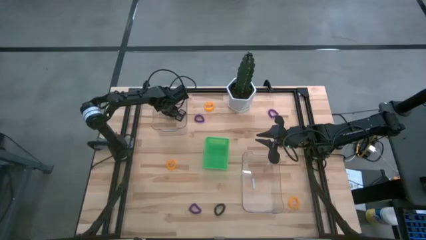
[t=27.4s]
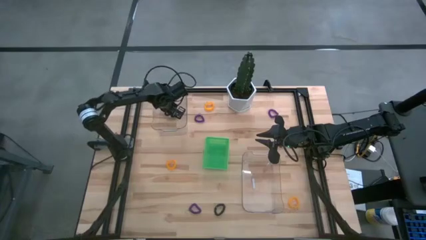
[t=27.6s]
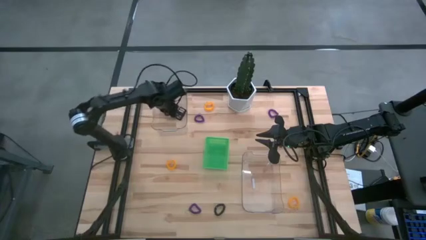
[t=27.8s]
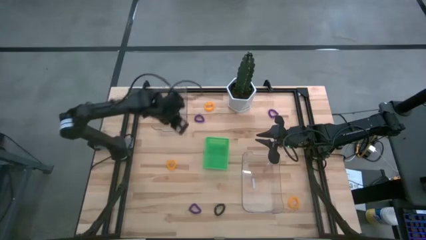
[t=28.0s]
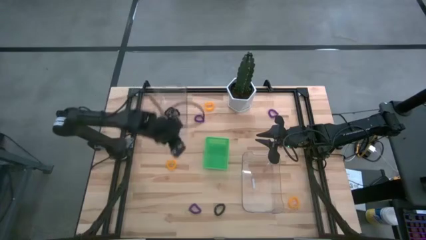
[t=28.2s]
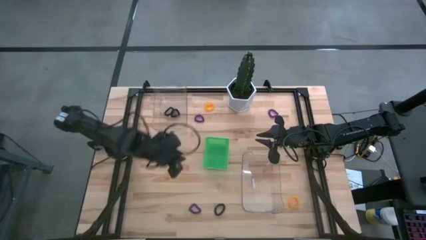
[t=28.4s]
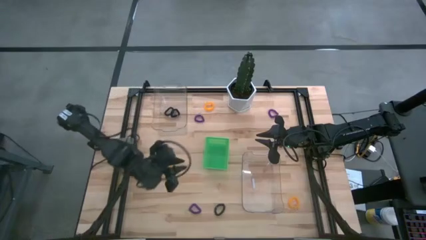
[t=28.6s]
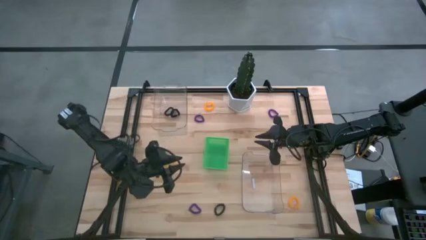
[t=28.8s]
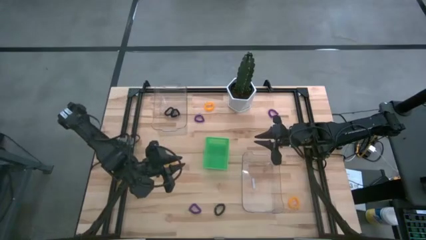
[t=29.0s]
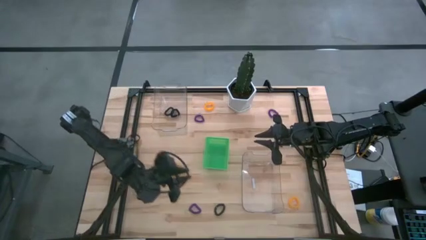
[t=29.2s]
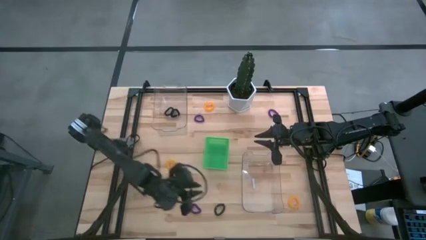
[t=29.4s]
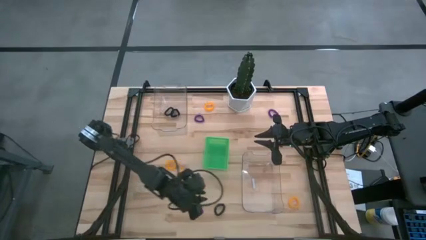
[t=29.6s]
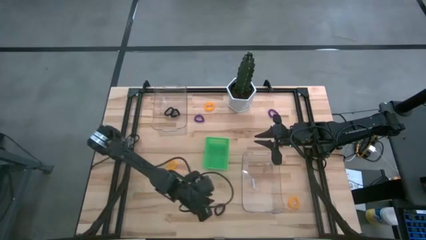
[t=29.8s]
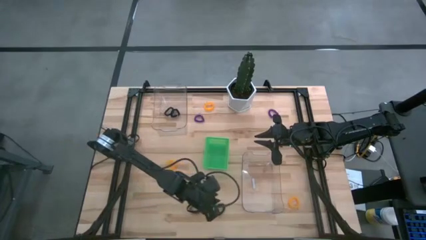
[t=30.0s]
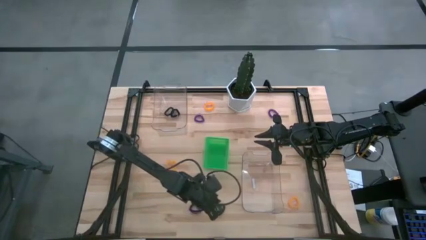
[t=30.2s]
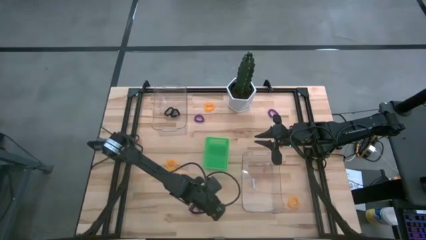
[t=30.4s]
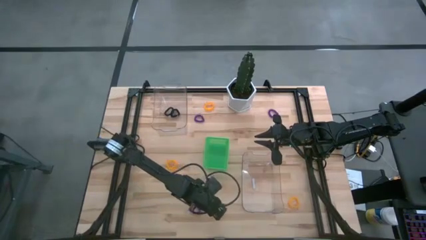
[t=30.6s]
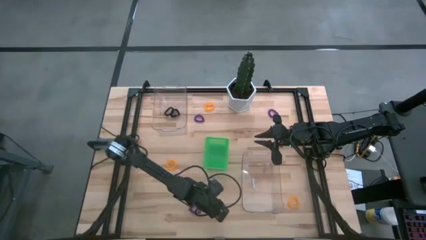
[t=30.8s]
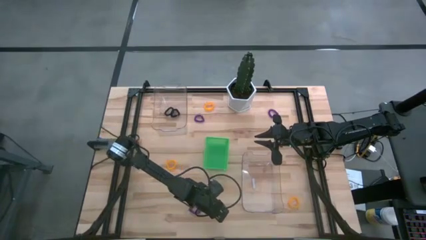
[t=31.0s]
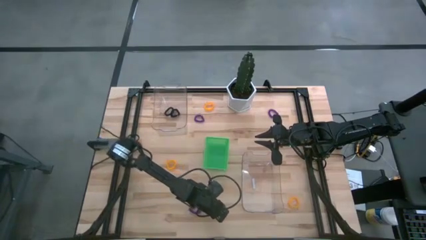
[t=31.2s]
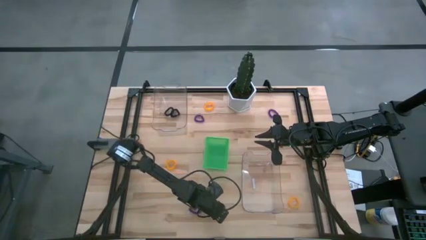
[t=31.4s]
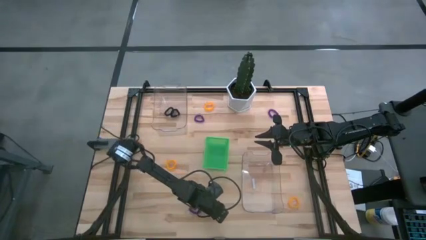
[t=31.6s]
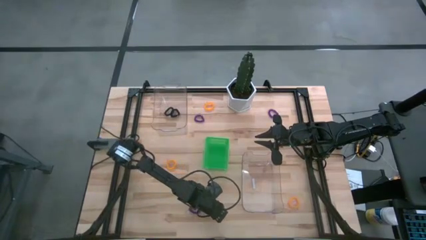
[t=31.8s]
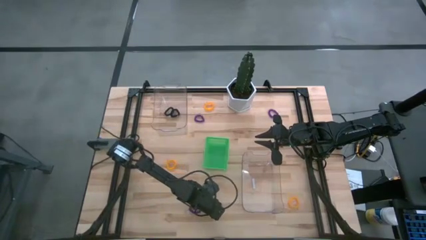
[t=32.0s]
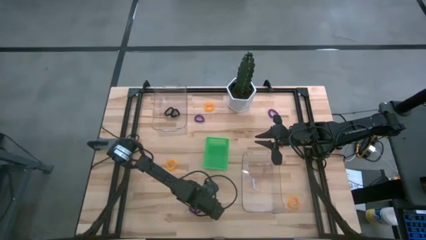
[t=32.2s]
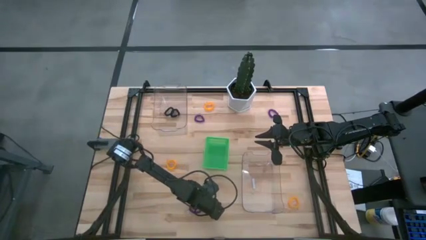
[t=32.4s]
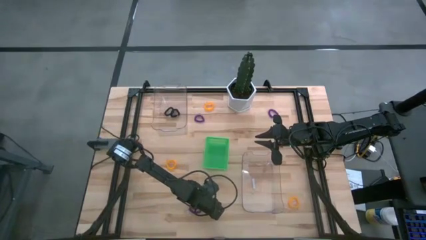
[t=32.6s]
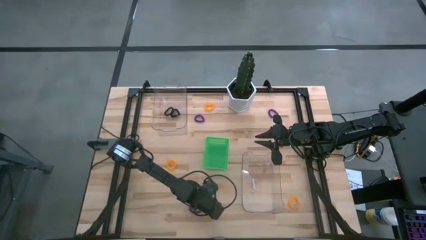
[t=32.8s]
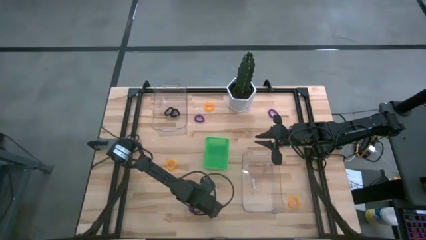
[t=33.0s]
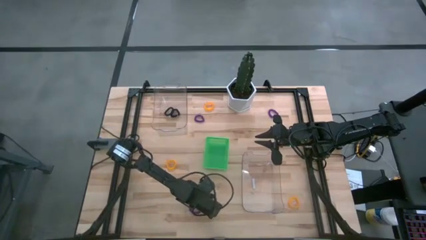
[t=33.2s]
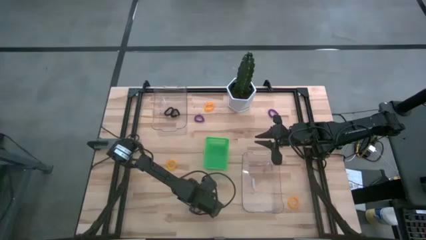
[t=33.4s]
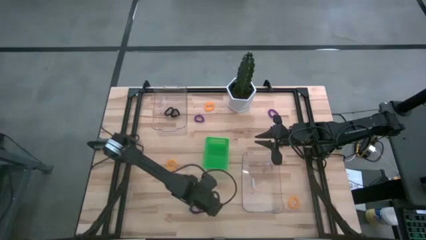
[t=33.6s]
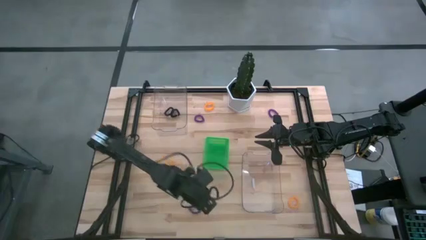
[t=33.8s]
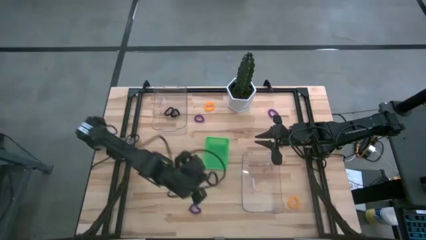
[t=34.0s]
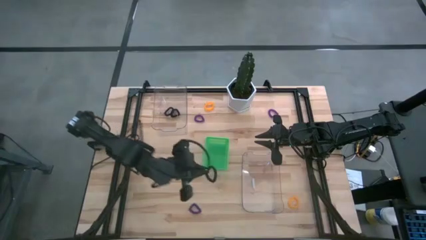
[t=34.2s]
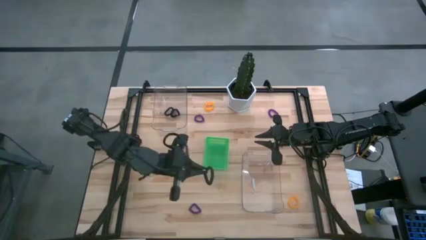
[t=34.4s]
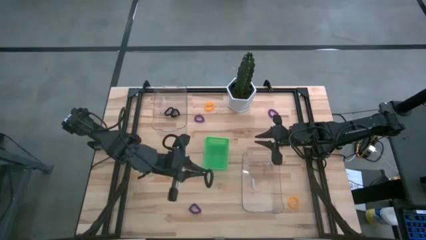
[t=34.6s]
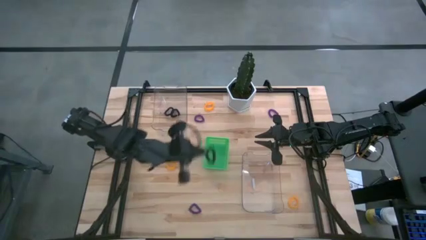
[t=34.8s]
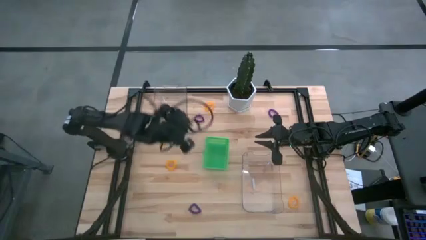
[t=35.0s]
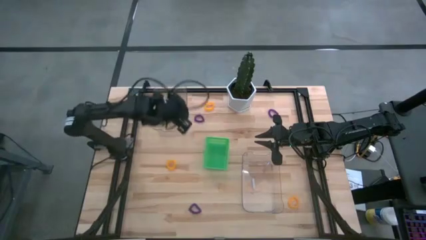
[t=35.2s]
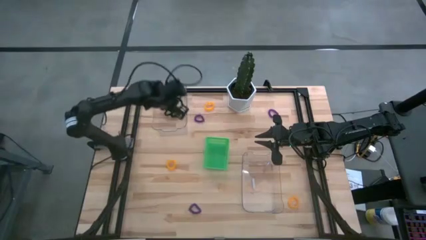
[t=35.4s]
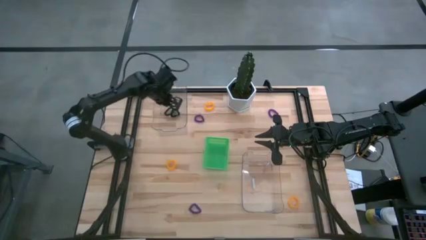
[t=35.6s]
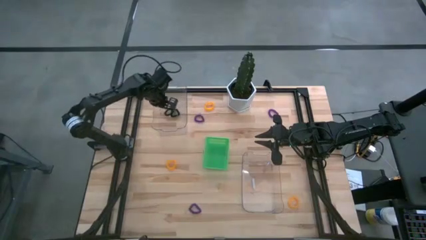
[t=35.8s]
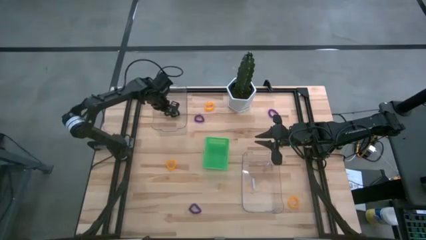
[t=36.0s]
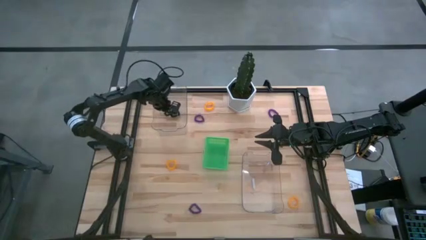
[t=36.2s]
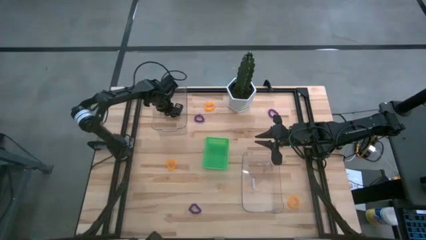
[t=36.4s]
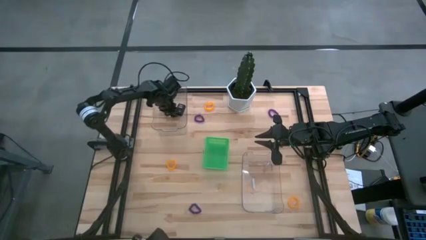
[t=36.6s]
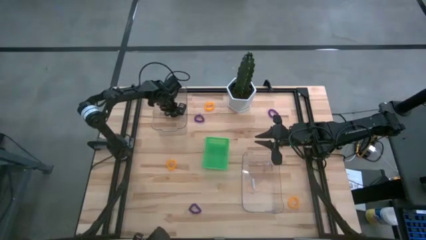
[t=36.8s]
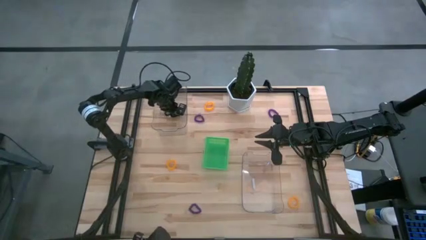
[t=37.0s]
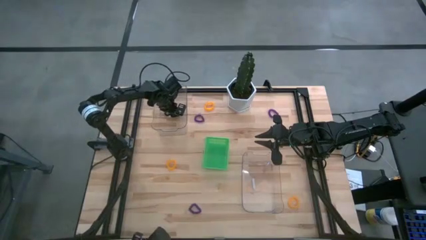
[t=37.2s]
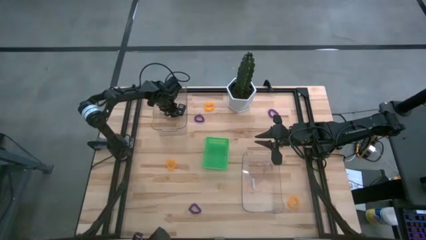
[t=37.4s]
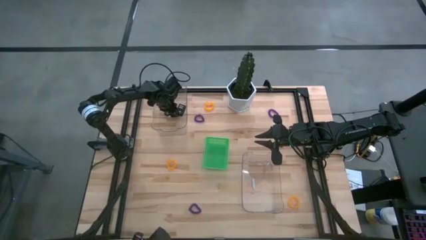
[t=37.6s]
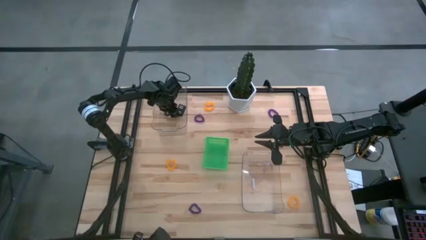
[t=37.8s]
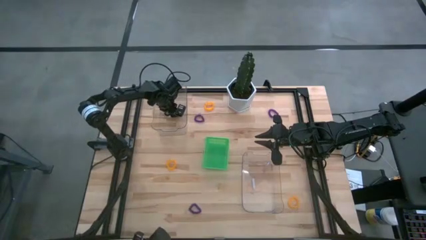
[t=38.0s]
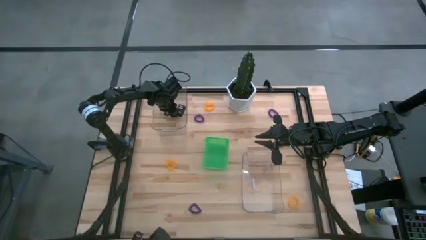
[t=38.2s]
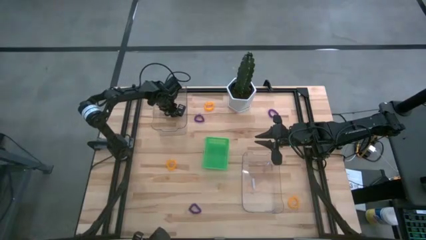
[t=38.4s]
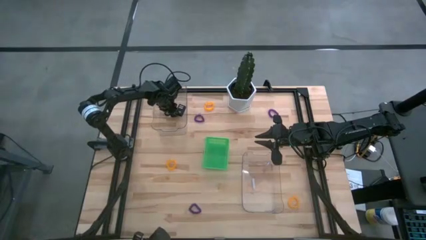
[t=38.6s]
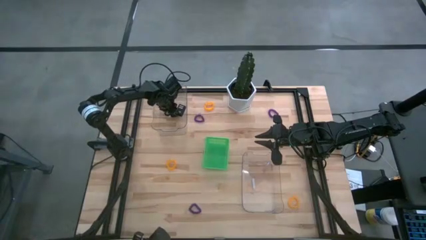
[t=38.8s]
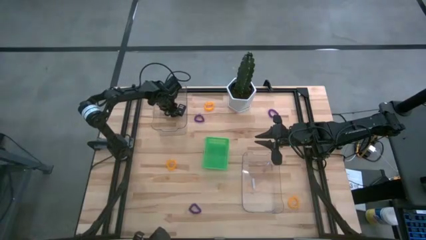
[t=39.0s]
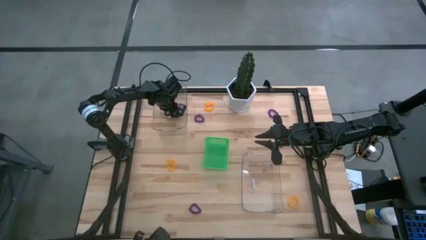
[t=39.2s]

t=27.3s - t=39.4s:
Task: Sort spring keychains
Put the black spring keychain into the top transparent bin
